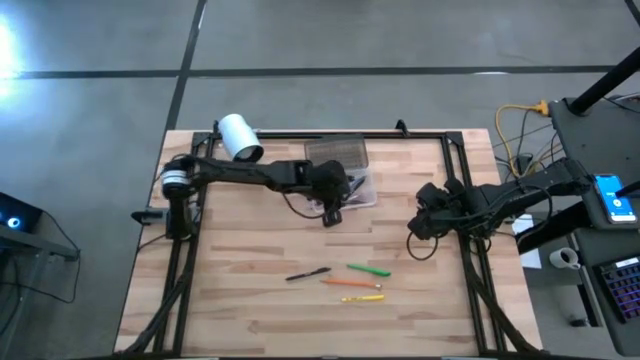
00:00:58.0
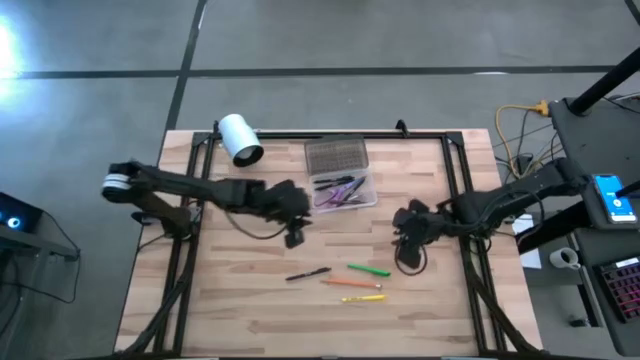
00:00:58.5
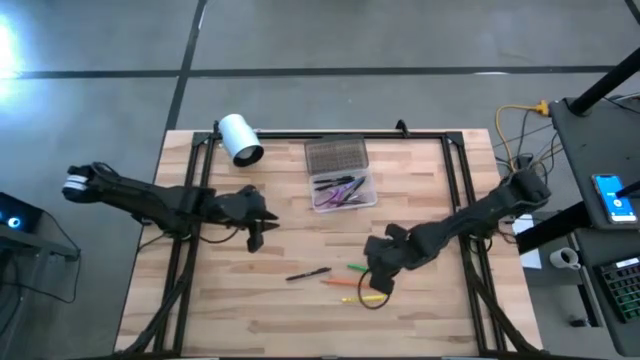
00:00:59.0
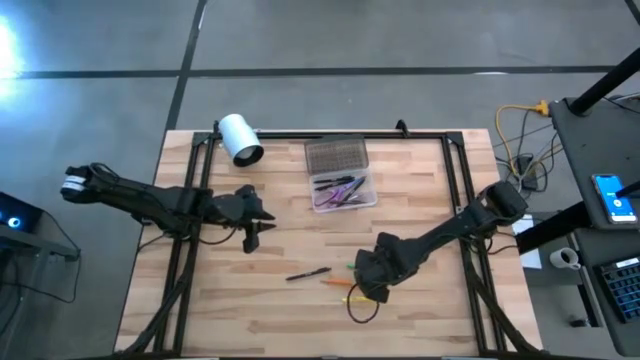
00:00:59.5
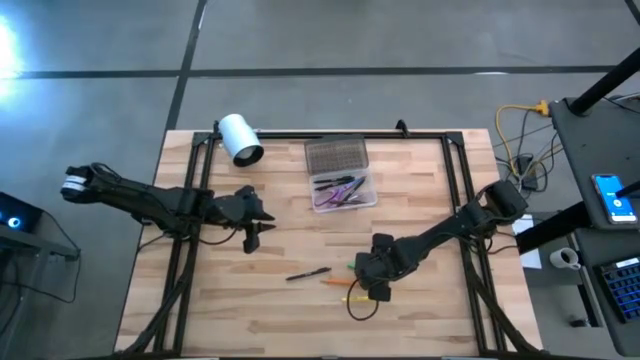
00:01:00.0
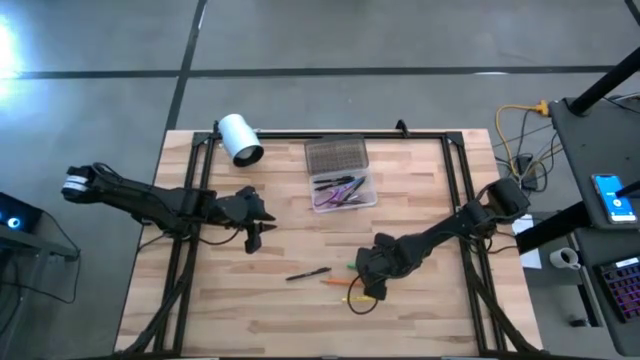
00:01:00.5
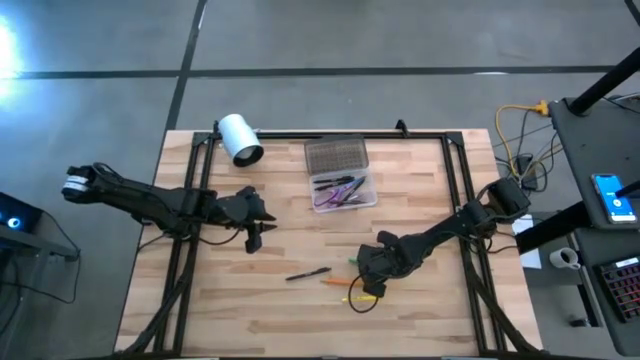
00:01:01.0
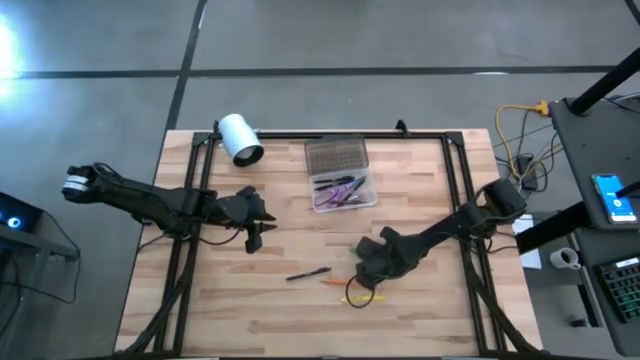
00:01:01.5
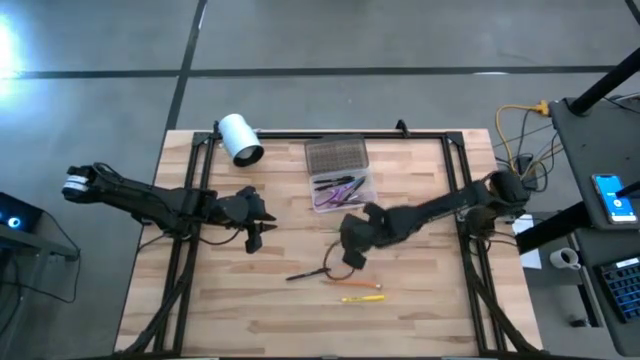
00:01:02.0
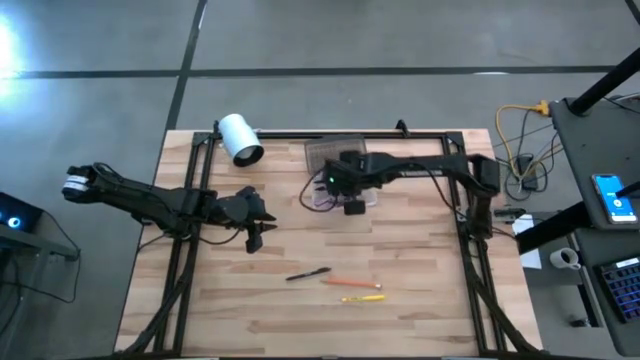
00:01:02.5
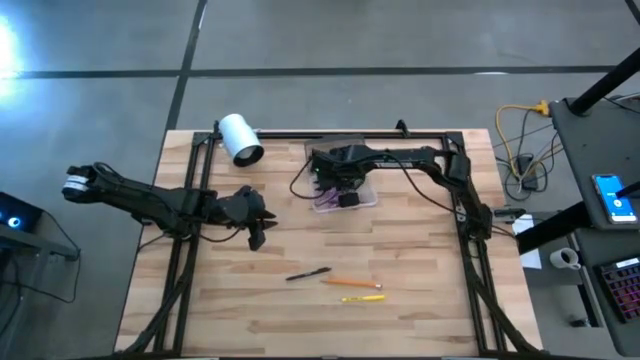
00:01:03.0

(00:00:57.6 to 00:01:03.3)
Task: Pick & place school supplies into a supply box
Put the green pen into the supply box

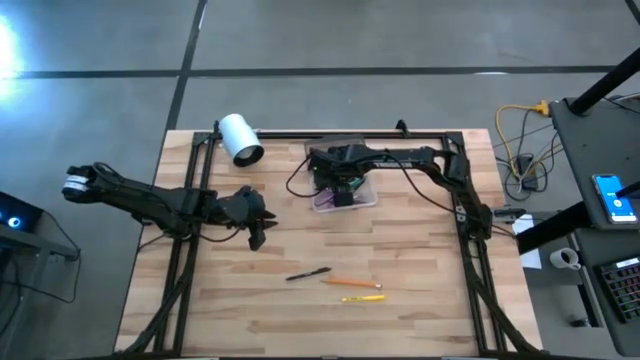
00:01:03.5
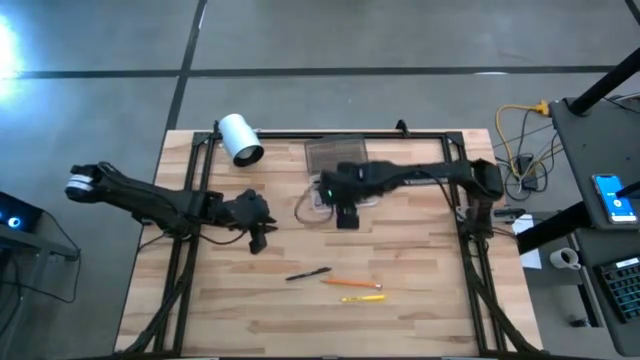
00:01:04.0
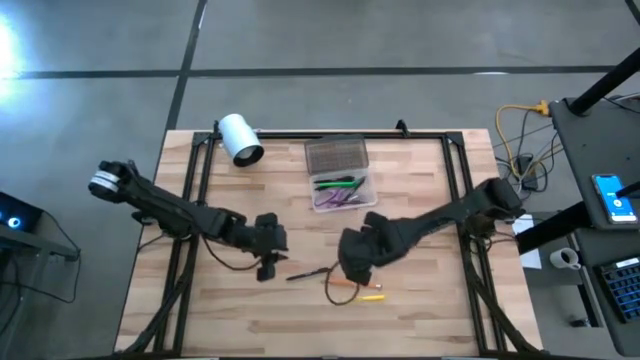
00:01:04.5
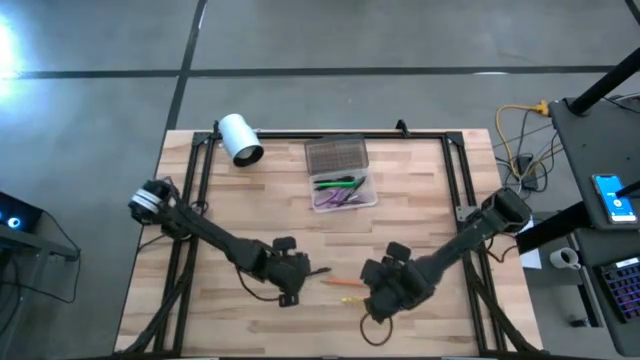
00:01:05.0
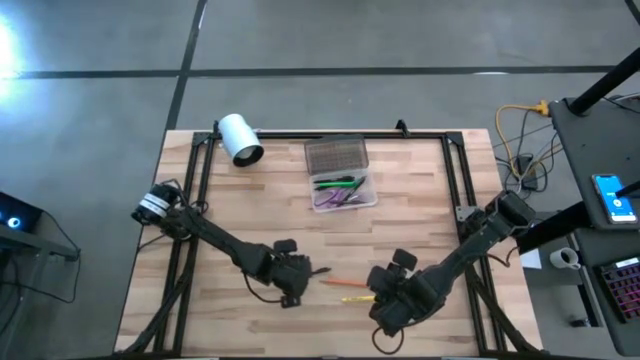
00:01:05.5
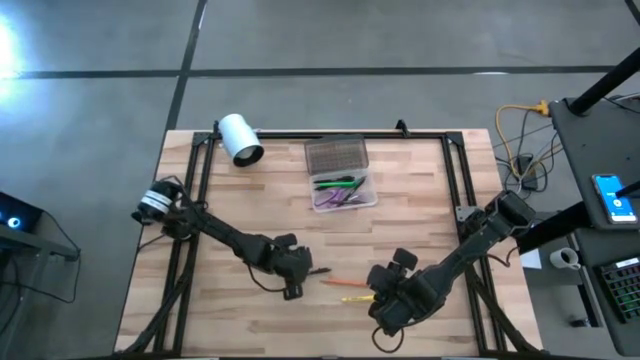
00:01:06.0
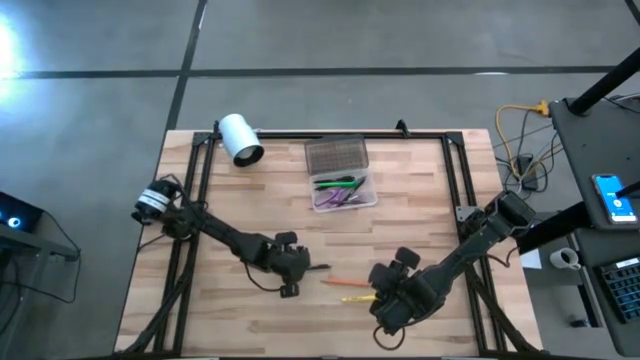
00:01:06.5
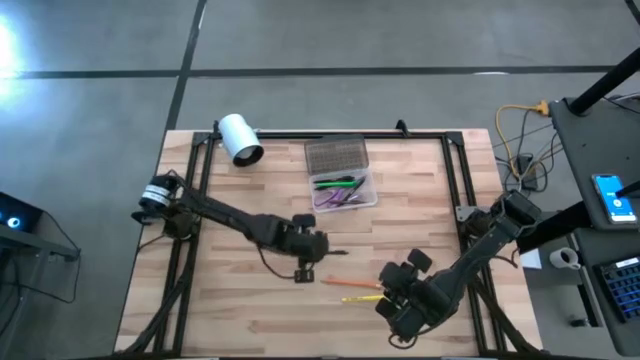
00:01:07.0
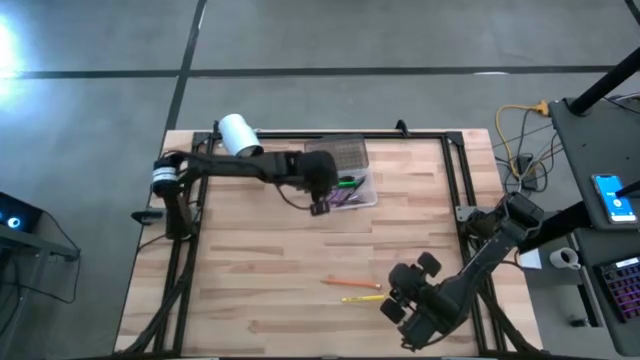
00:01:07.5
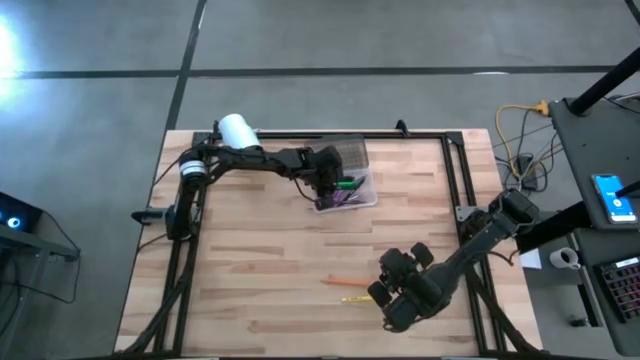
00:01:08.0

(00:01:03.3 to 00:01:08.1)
Put the black pen into the supply box

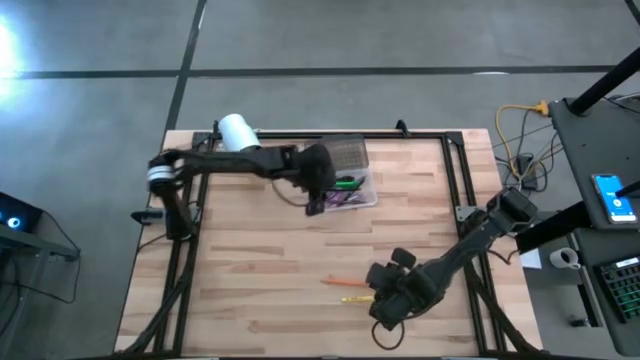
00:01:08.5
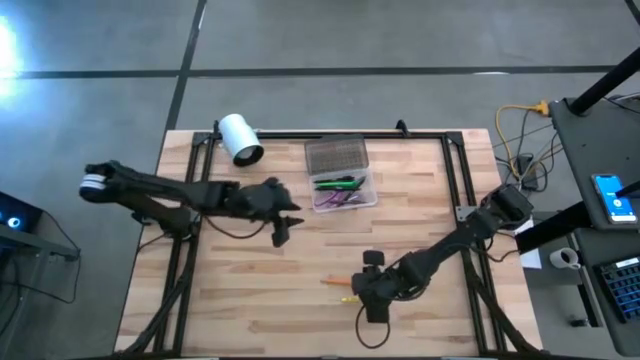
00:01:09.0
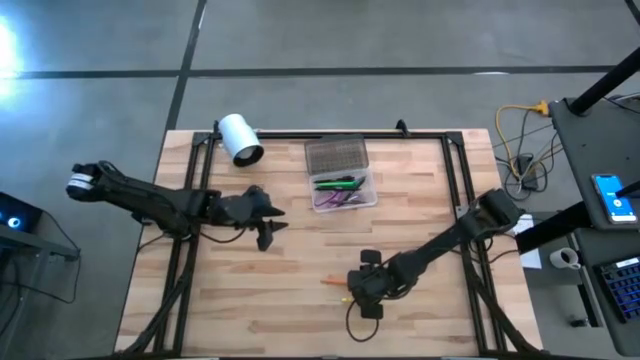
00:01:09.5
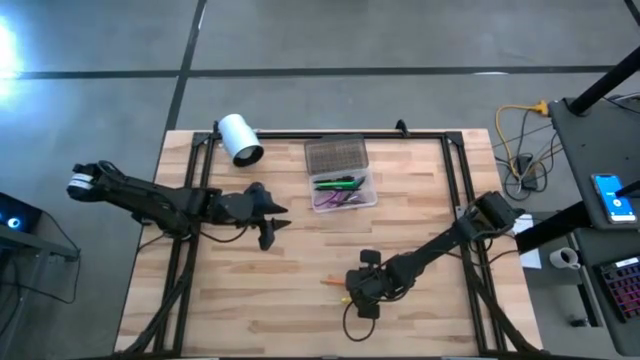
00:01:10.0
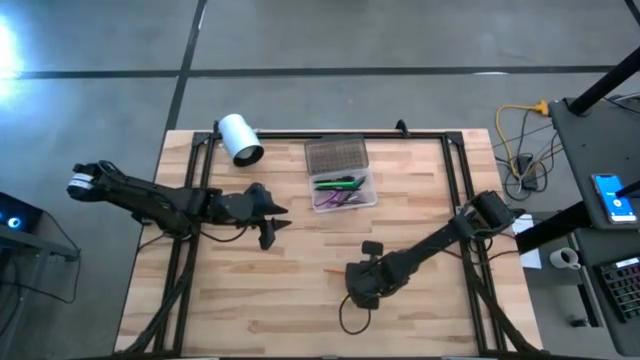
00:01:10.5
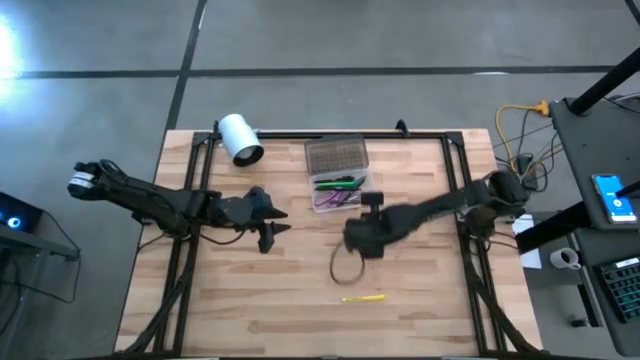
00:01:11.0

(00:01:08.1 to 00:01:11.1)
Put the pencil into the supply box

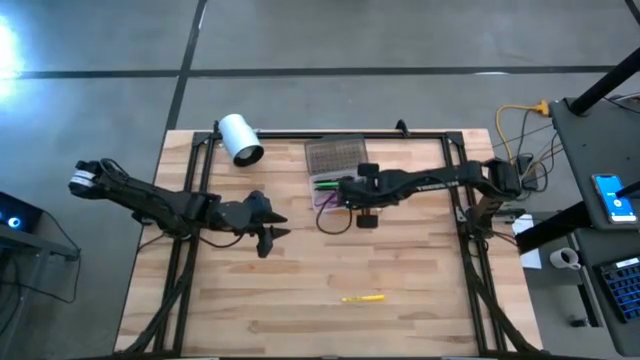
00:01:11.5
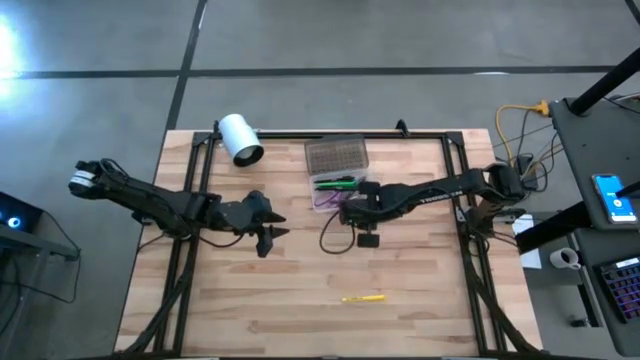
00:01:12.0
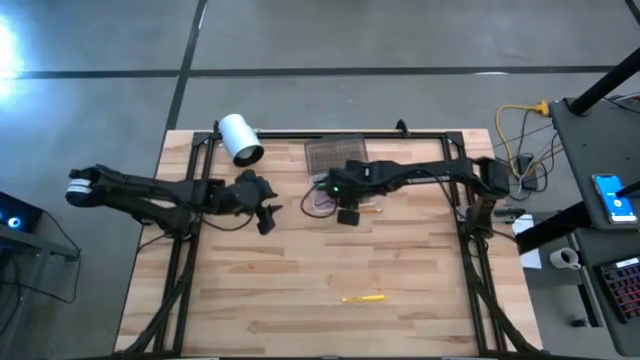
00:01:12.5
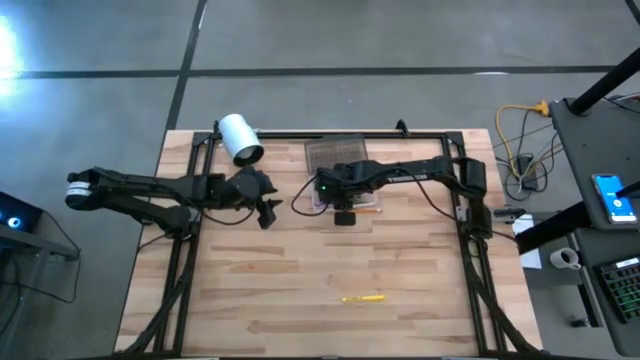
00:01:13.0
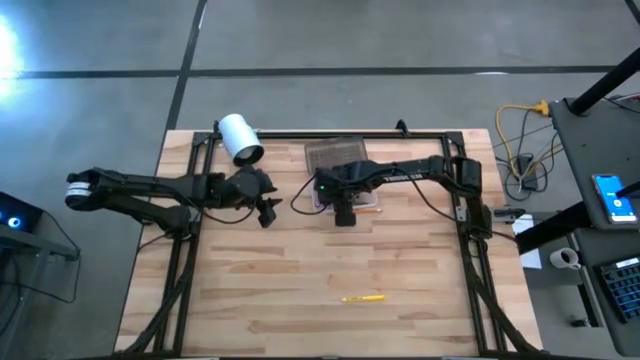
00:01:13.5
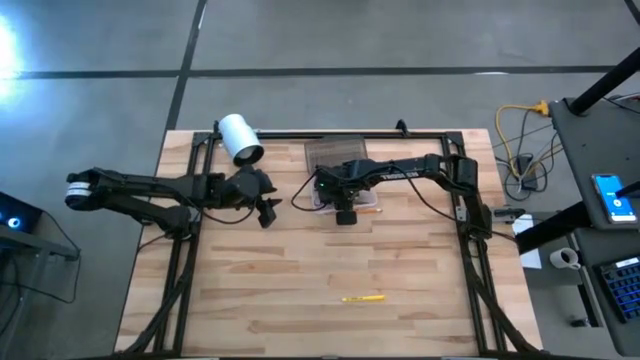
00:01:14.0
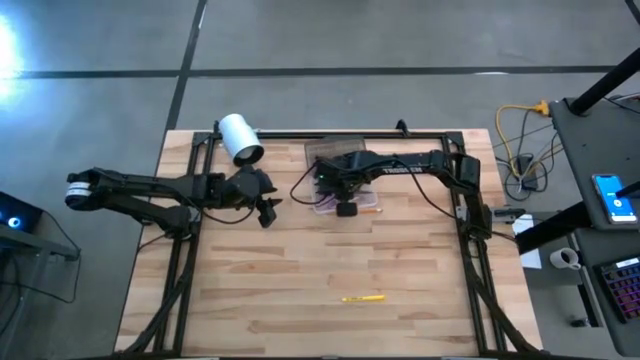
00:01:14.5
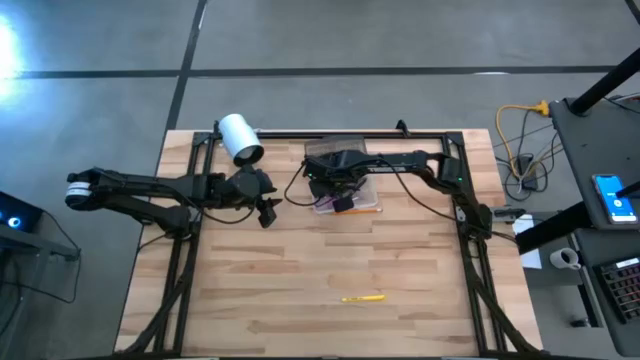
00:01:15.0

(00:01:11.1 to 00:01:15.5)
Adjust the brown pen in the supply box

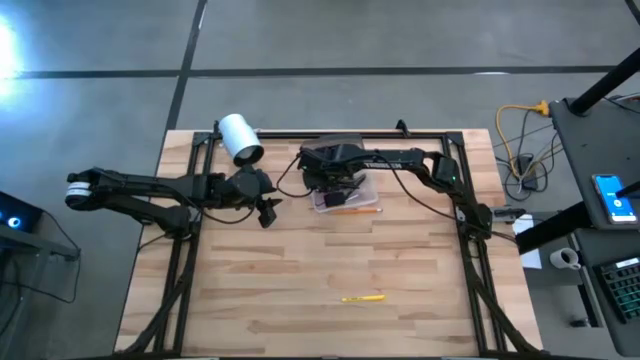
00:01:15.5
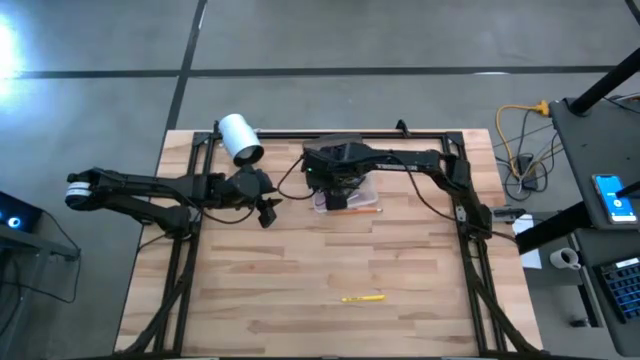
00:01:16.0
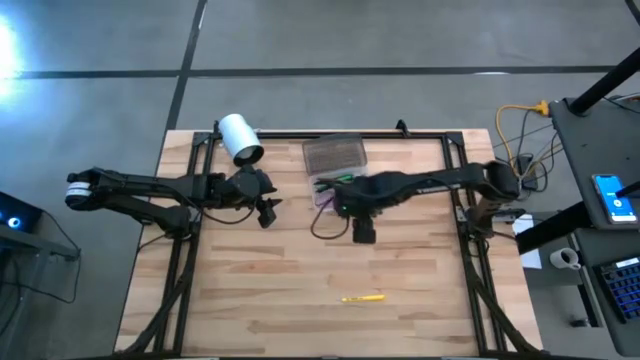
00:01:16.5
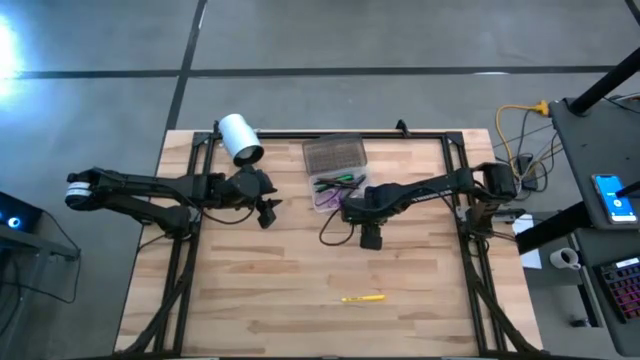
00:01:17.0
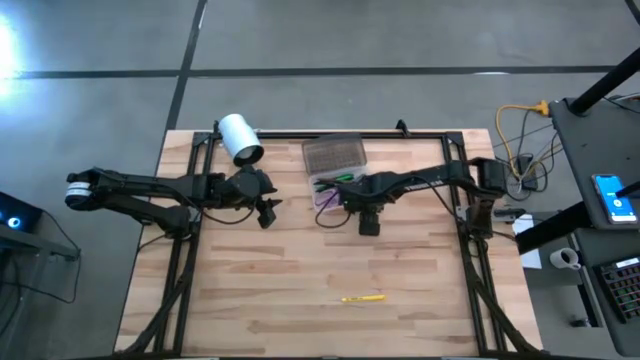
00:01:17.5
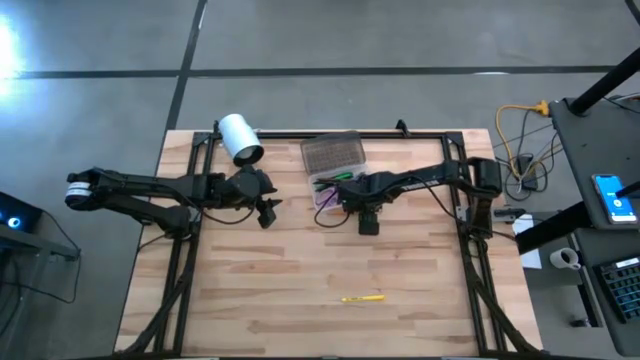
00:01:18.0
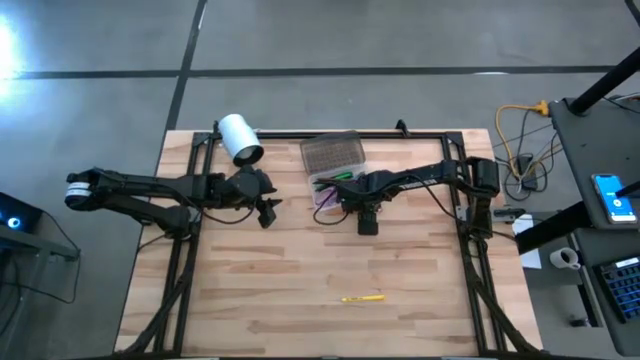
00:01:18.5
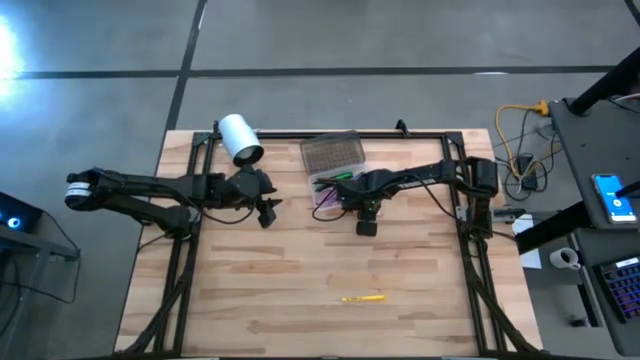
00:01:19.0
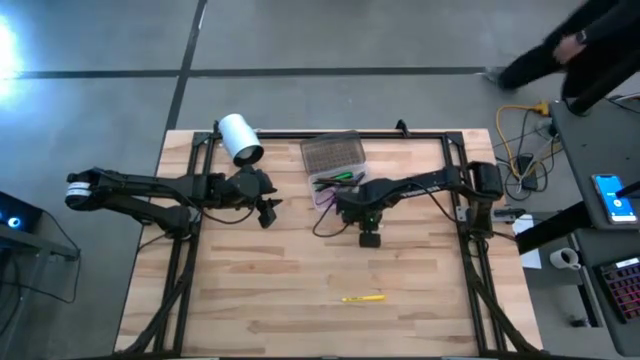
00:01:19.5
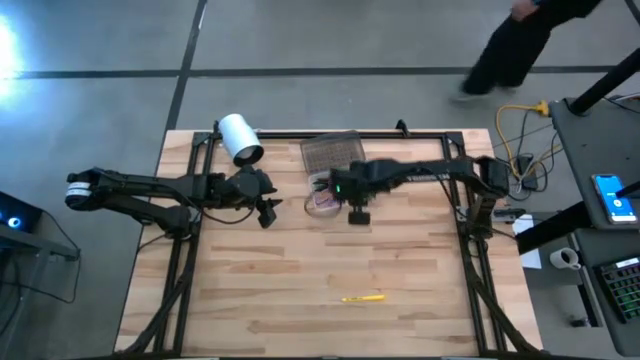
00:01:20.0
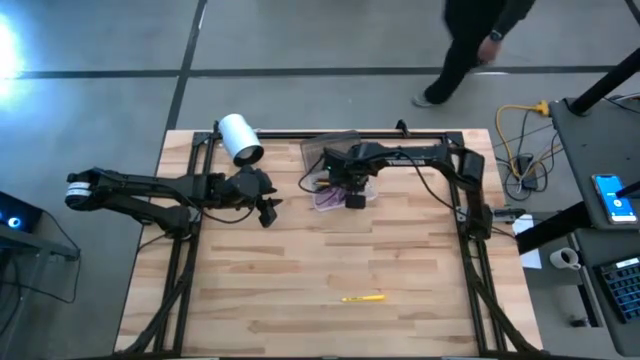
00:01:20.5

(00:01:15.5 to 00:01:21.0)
Put the pencil into the supply box
